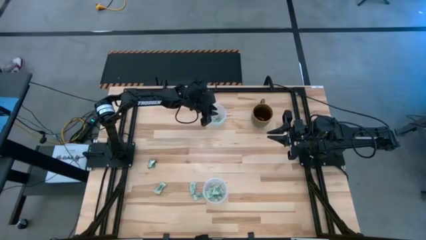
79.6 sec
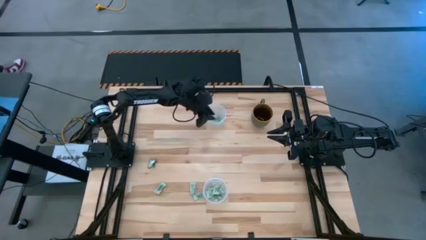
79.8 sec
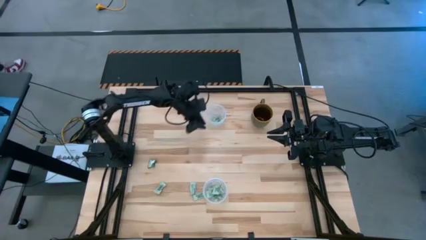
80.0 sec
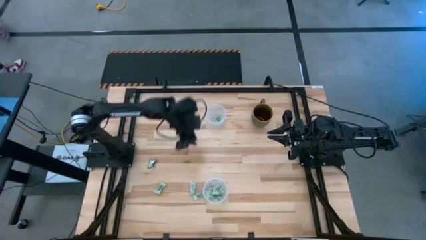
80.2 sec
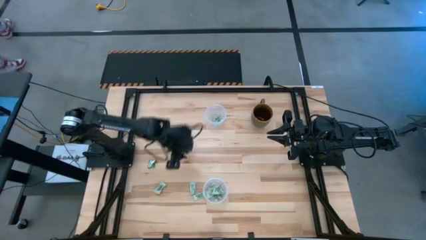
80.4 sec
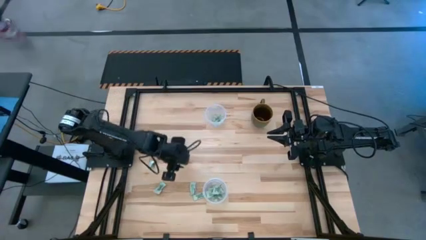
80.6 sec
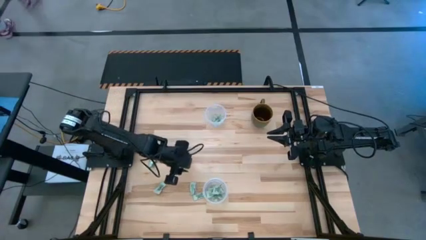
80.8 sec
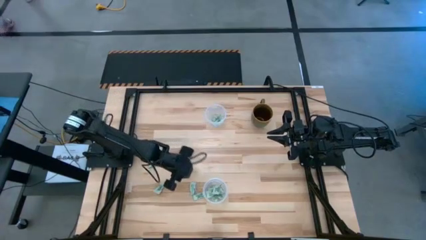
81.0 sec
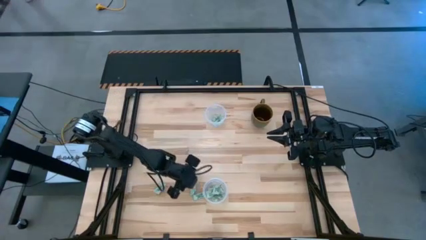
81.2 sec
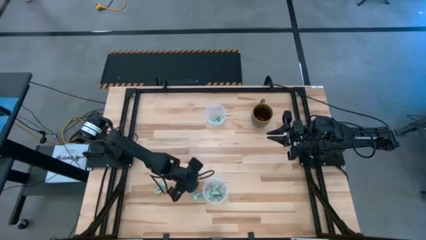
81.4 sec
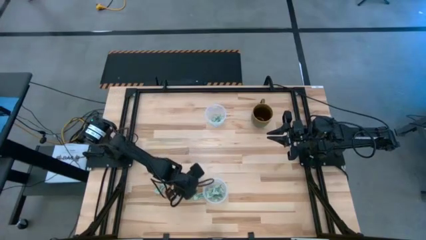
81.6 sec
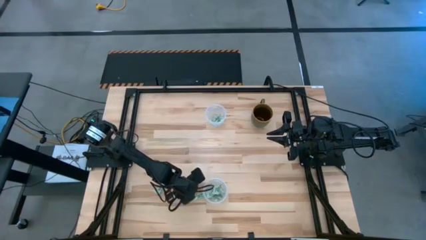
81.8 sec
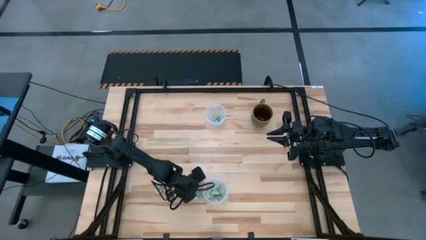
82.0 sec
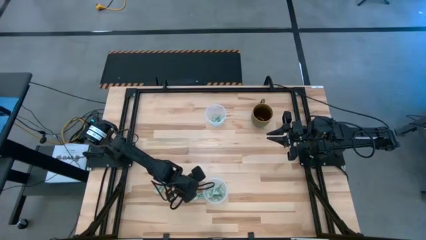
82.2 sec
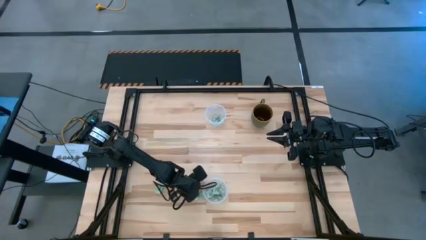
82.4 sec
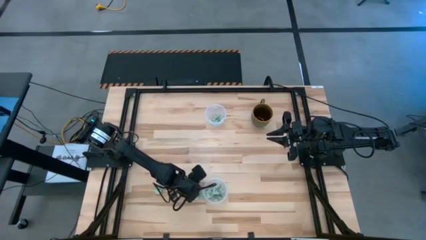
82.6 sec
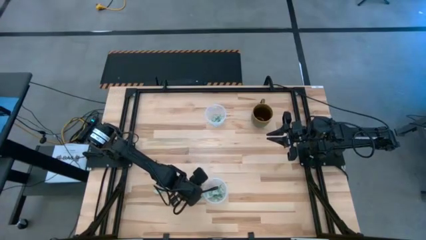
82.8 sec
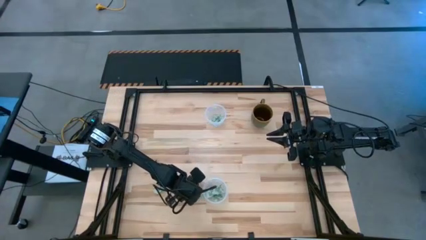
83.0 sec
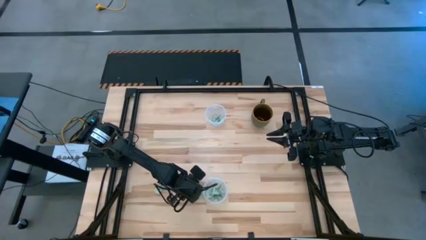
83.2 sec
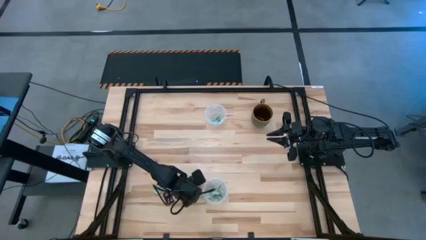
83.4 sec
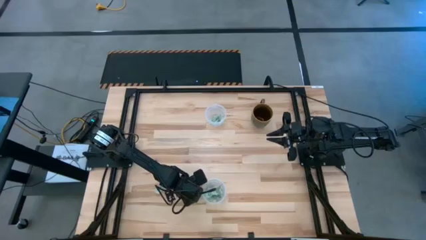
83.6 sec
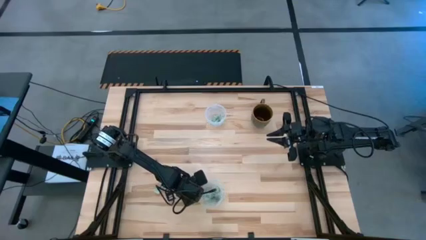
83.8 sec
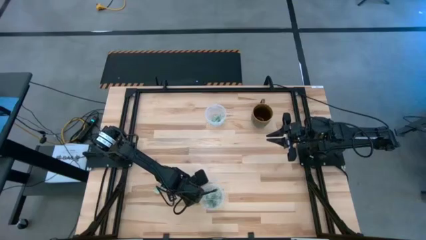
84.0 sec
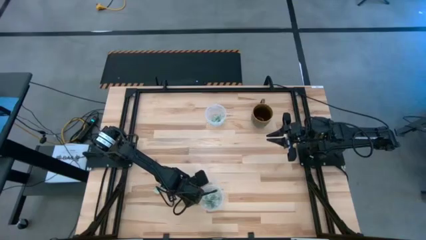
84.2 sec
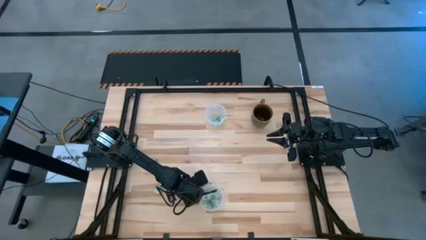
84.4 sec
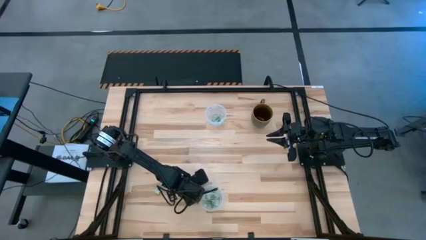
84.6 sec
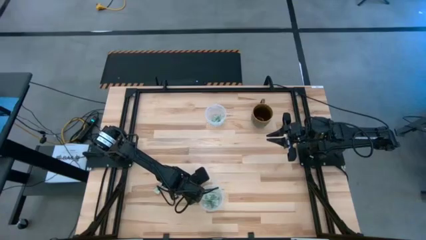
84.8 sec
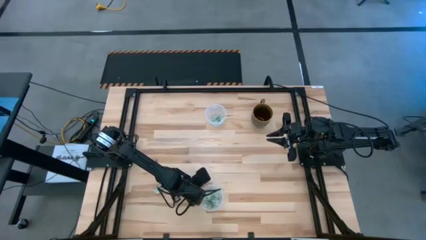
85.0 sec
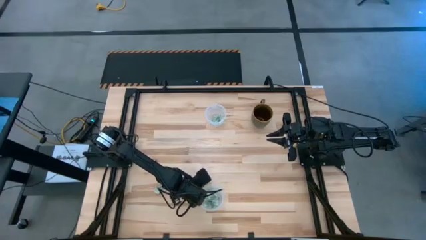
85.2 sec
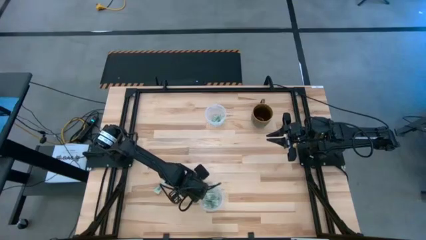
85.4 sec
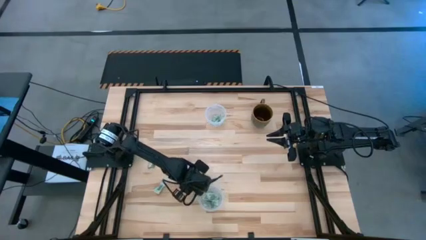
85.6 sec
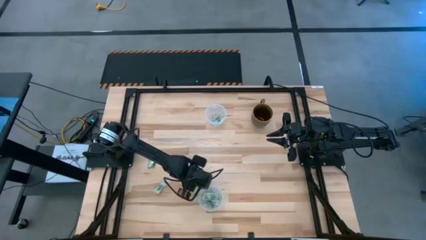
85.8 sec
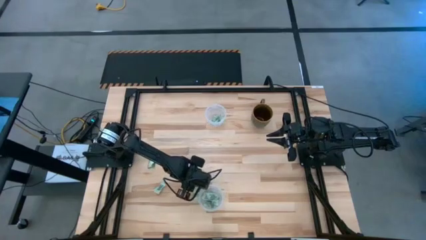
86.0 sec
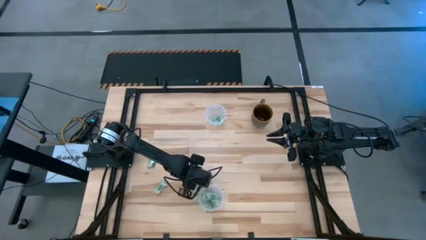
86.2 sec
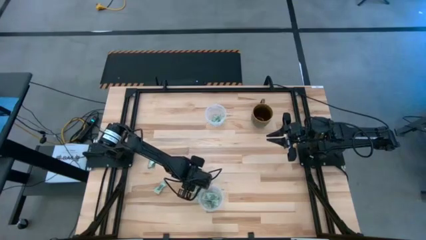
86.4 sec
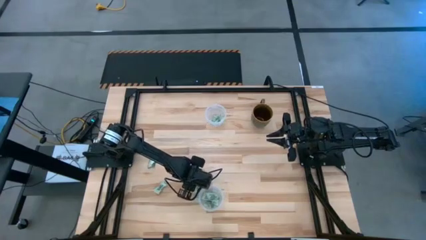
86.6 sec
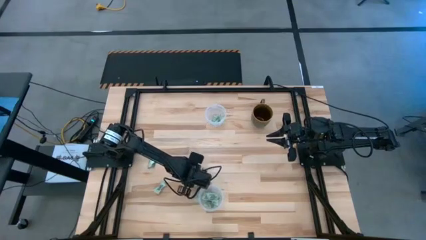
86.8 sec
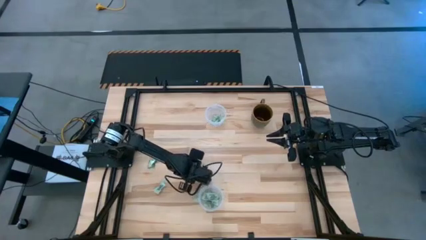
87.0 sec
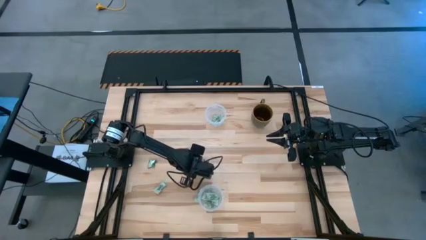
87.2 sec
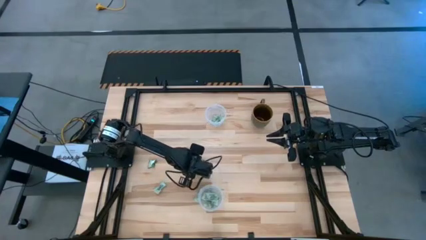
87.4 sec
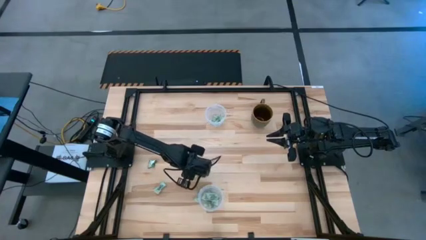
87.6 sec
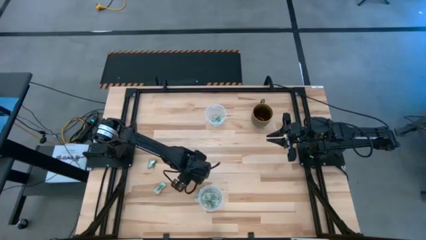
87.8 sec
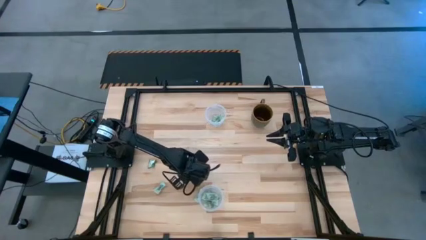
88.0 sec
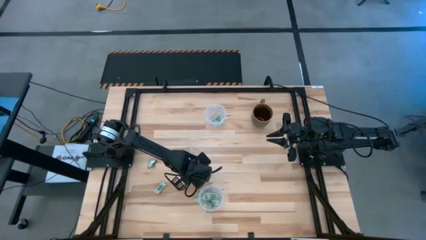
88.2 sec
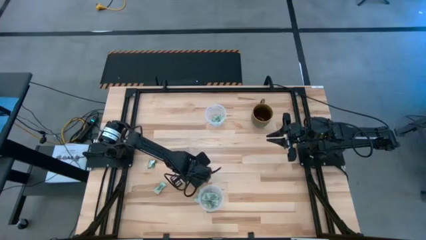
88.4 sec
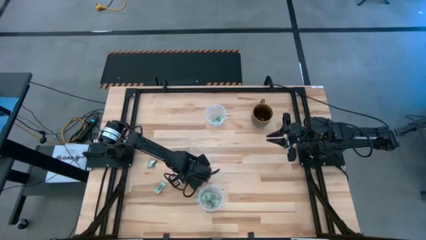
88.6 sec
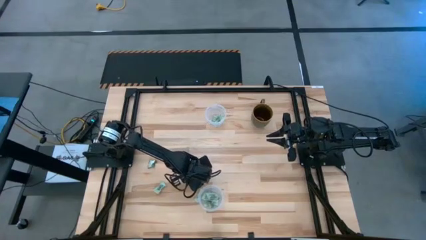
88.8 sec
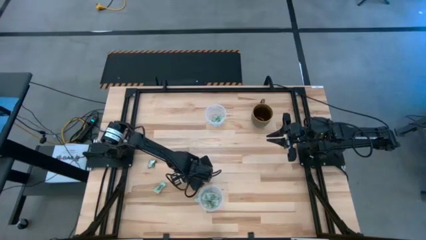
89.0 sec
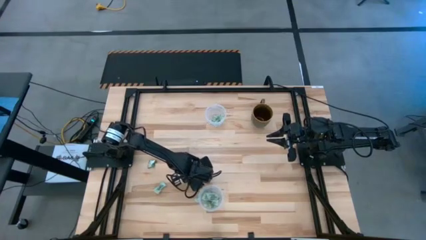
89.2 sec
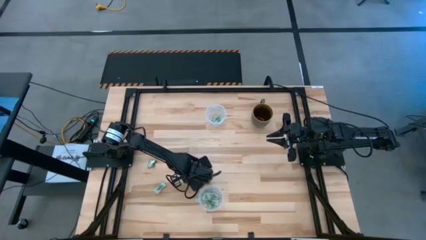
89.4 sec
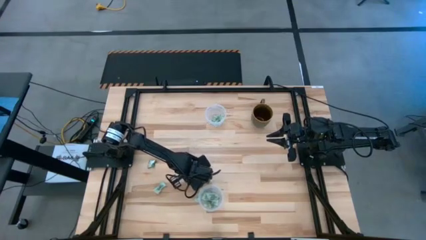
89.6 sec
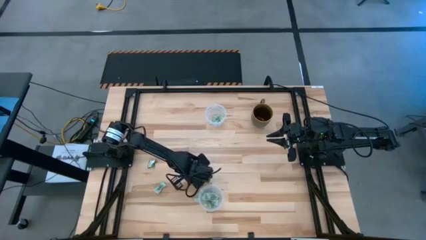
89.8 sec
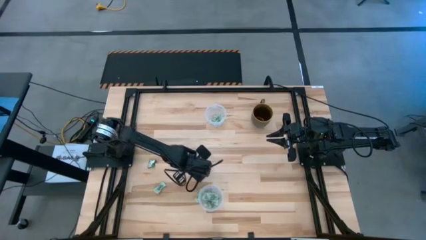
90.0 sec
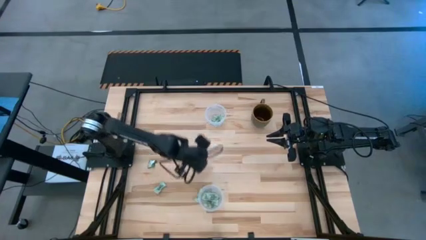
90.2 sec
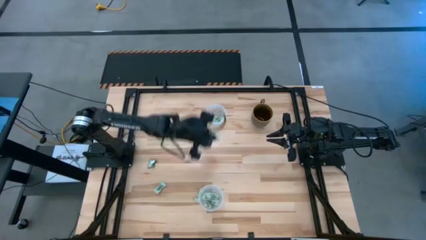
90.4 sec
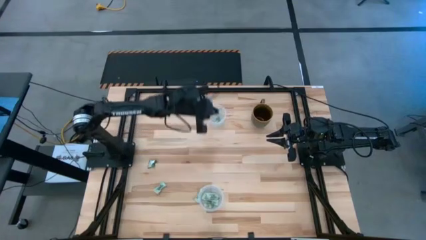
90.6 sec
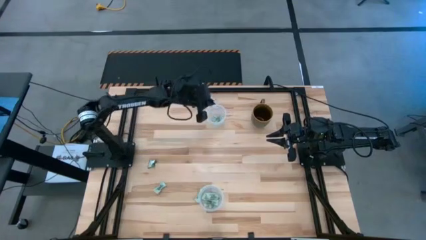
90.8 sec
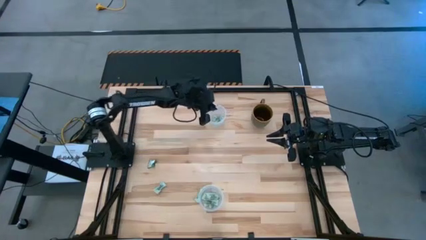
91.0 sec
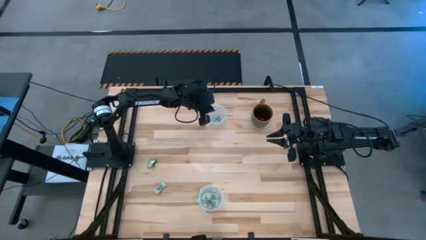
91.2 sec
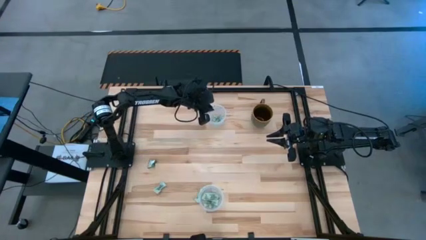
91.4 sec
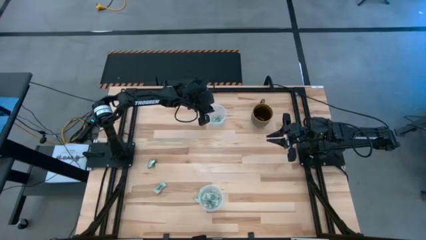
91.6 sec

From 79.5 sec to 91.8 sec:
Task: Pick and place Stevia / Truvia into bins
Put the stevia packet into the top transparent container

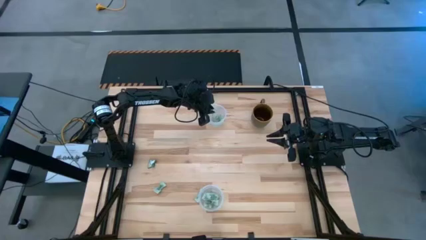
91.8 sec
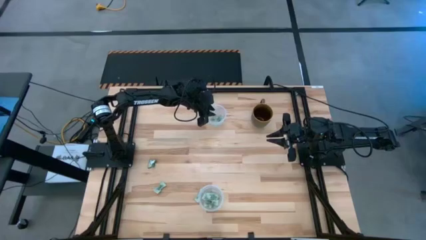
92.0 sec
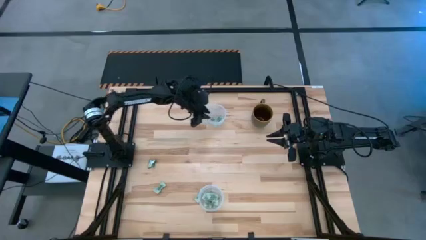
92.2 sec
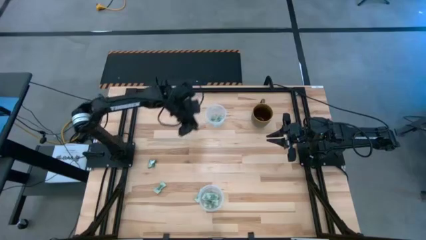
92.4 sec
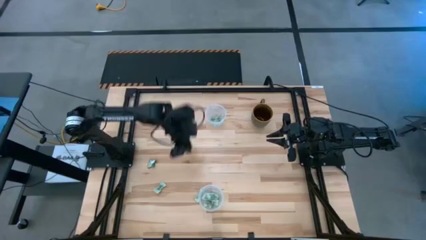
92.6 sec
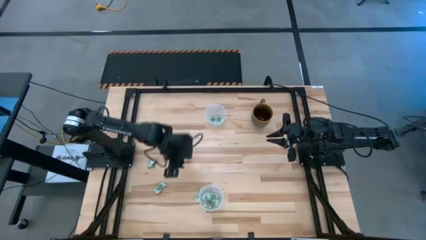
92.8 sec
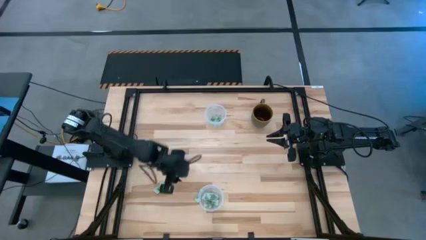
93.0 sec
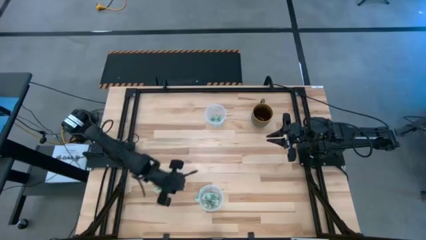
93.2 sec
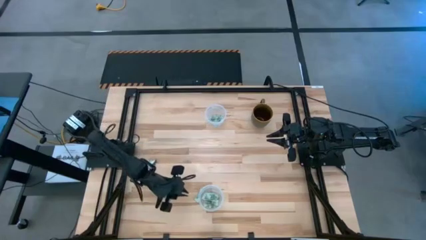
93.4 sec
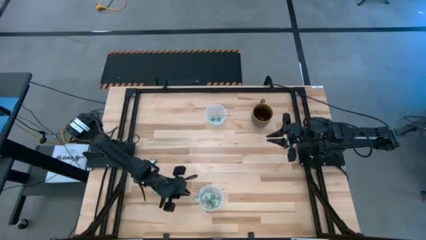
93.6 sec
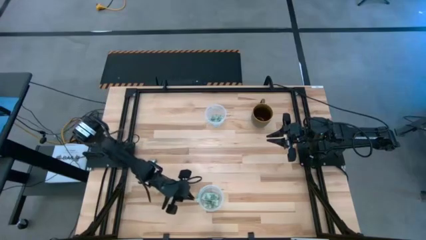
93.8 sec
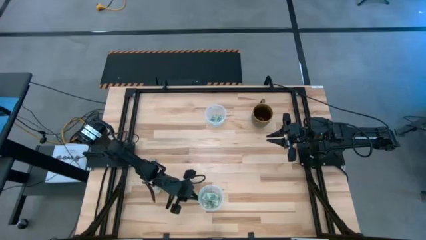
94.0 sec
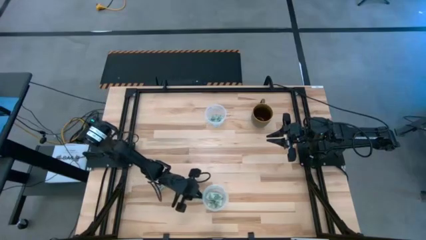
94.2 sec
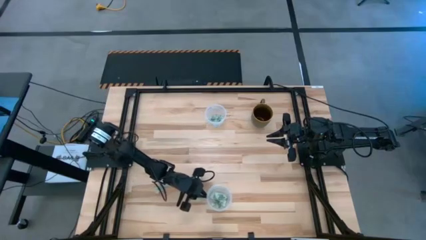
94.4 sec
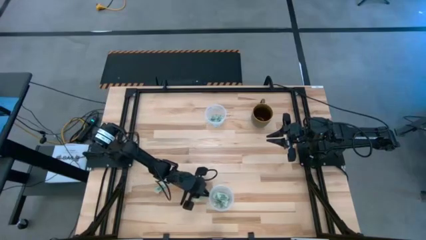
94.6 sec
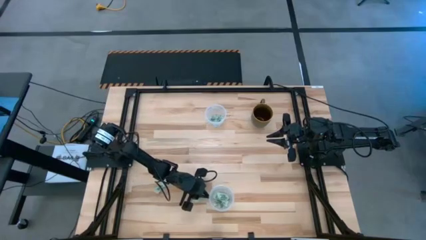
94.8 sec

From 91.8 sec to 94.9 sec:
Adjust the bottom transparent container
